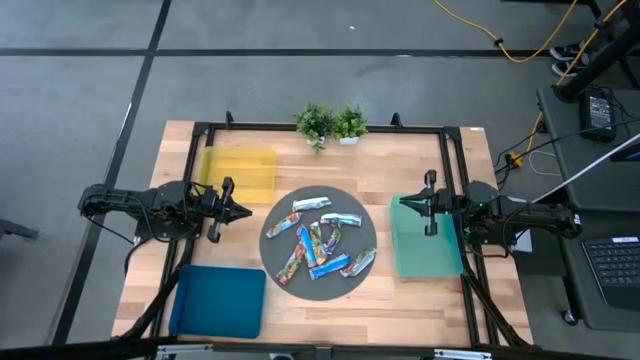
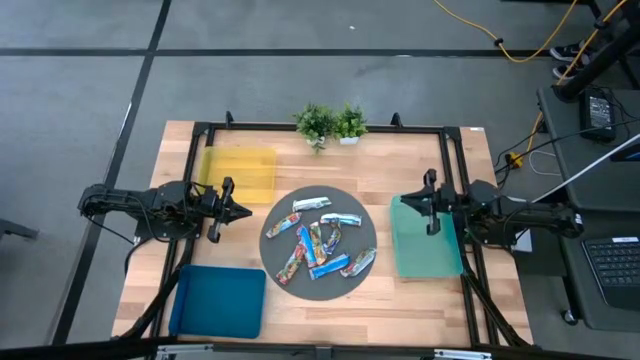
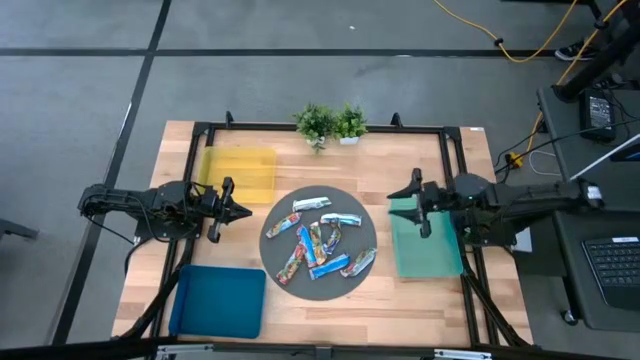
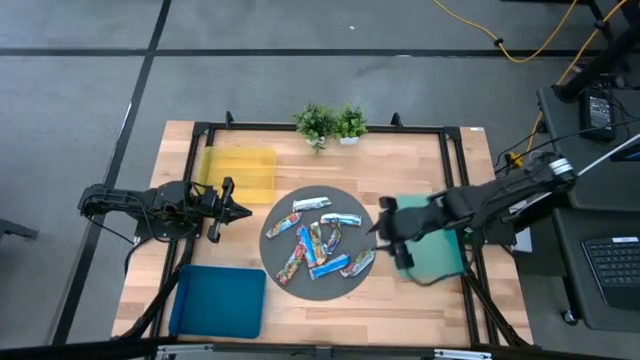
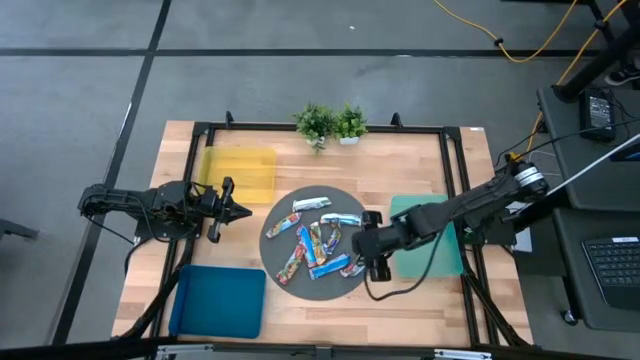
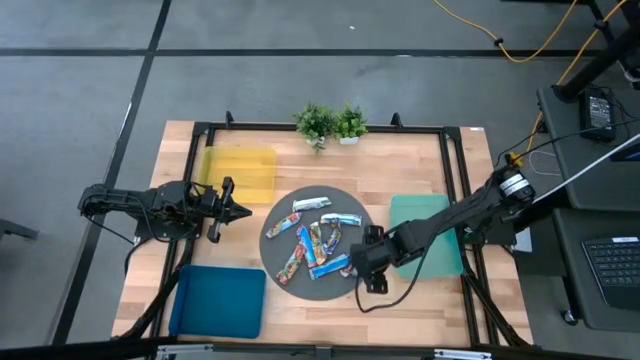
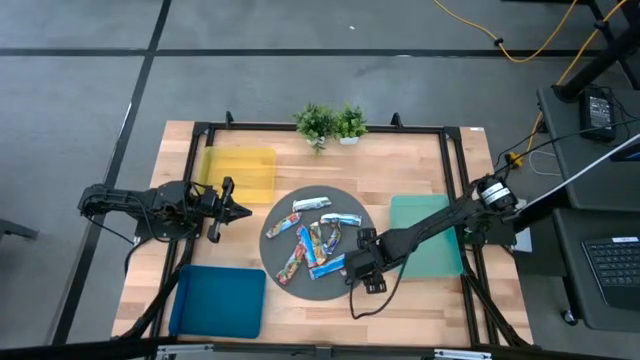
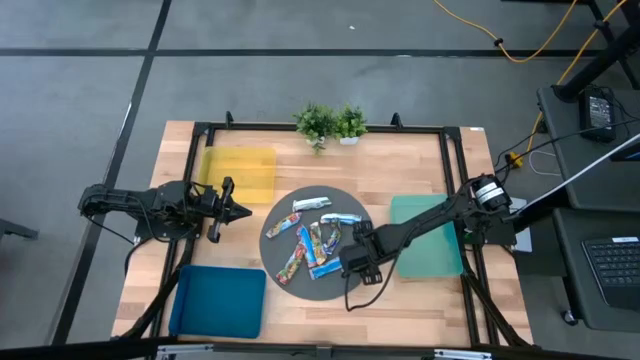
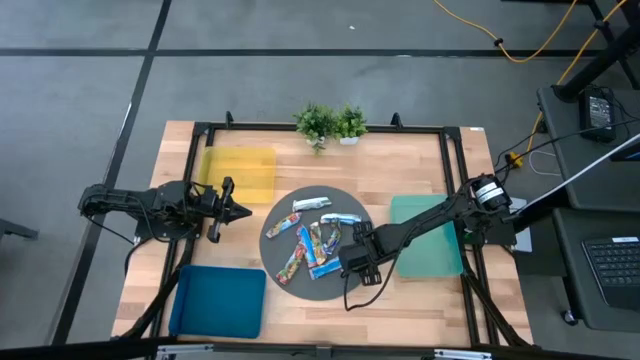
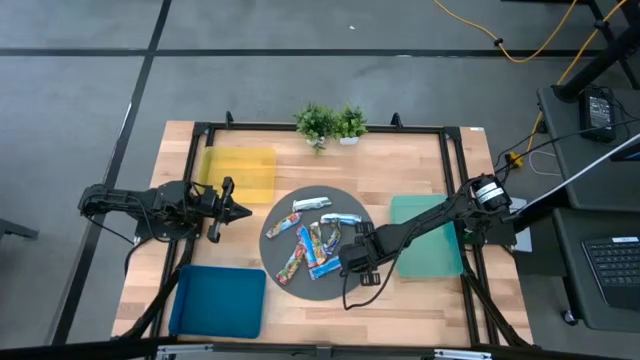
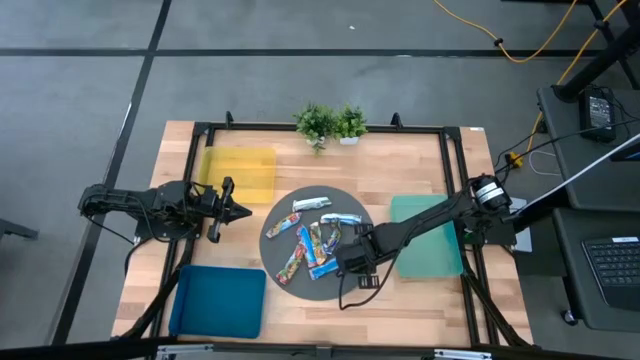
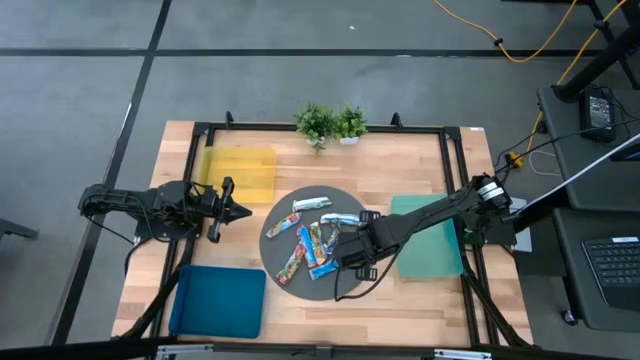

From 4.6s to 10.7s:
Task: Pick and place Granola Bars by type
Put the red granola bar into the green bin

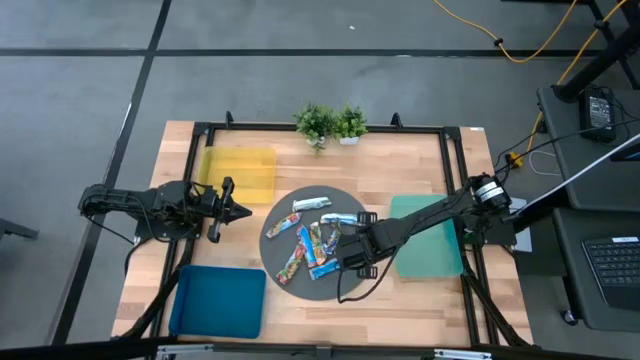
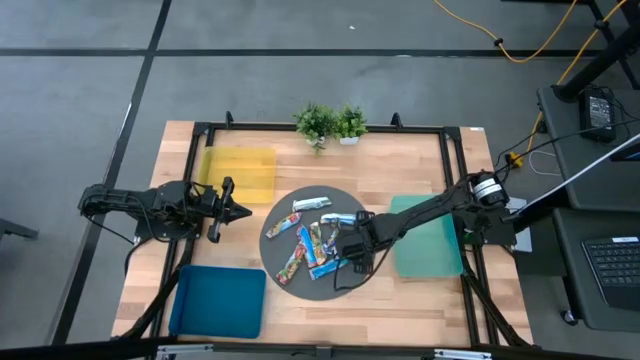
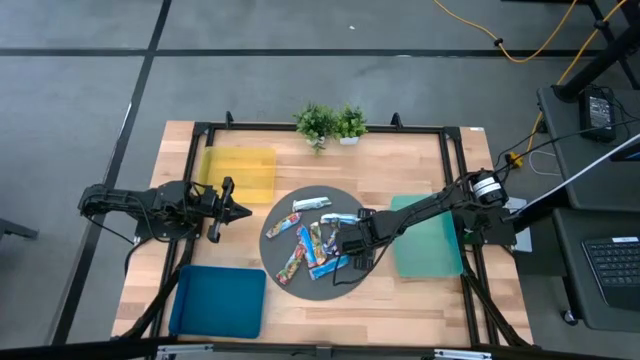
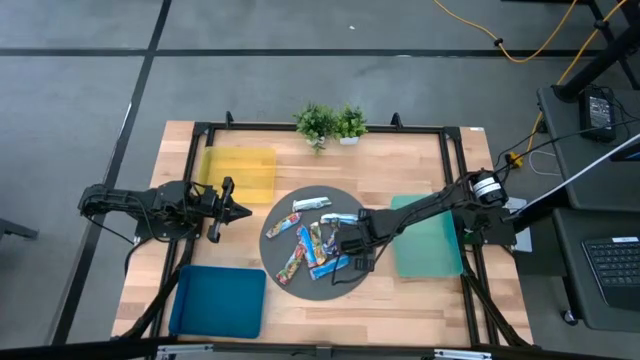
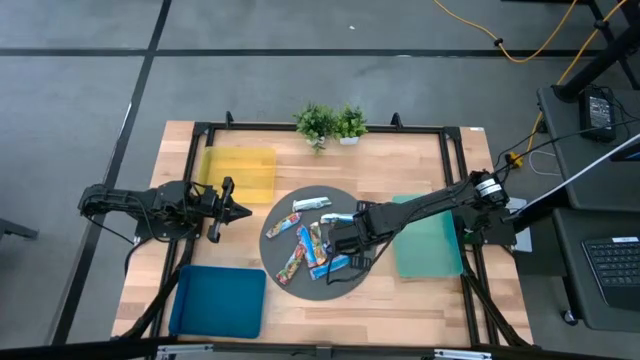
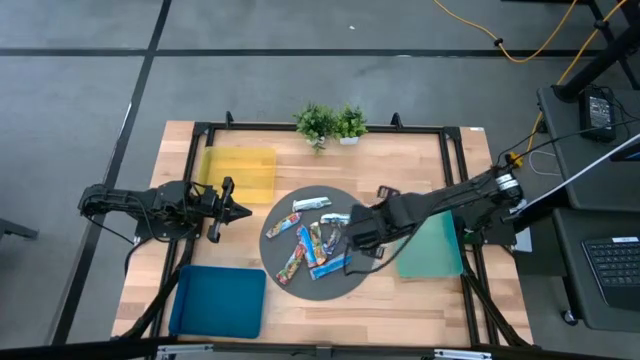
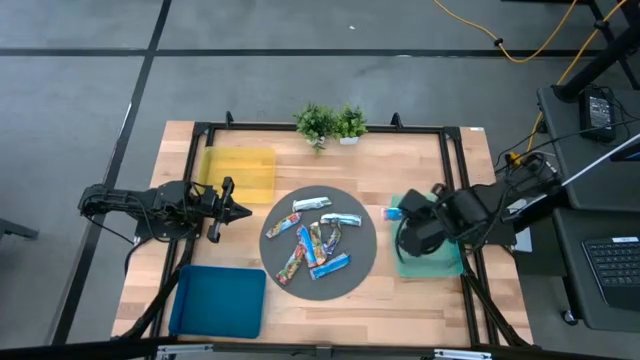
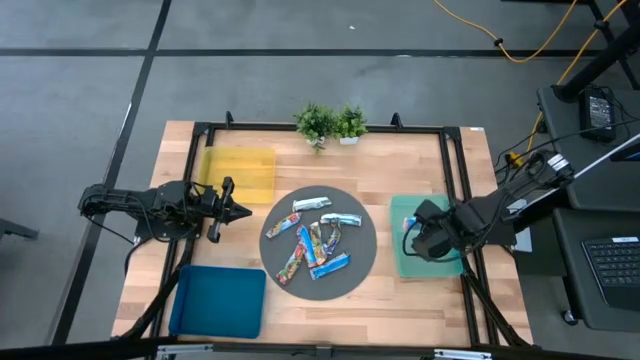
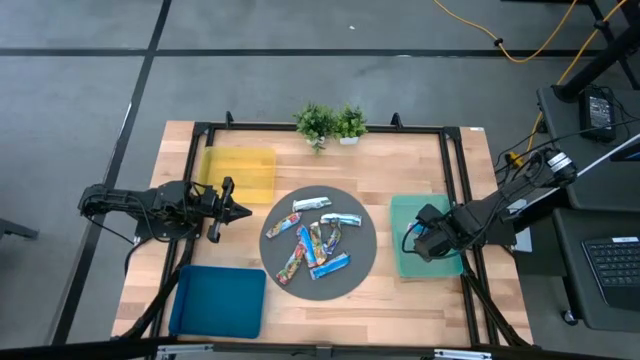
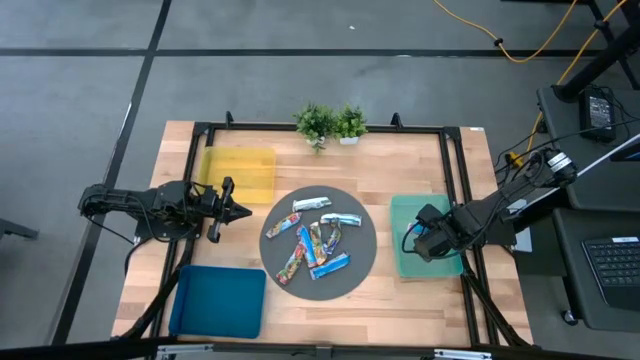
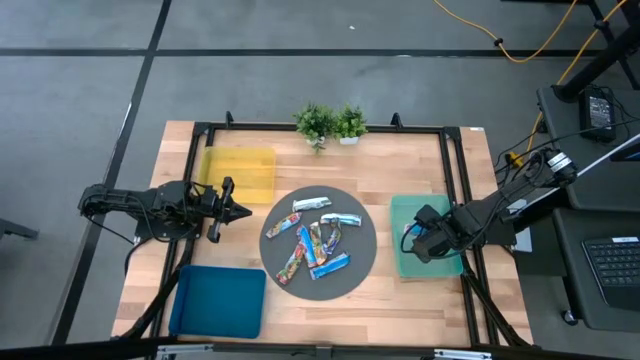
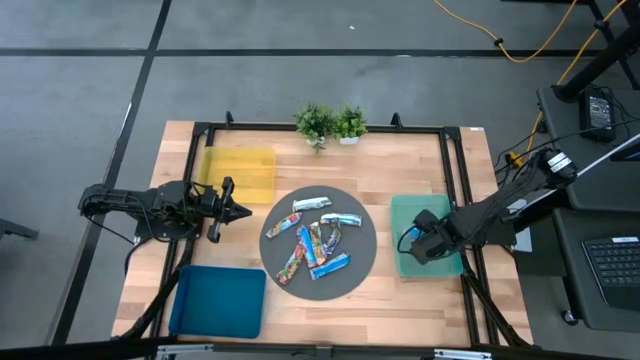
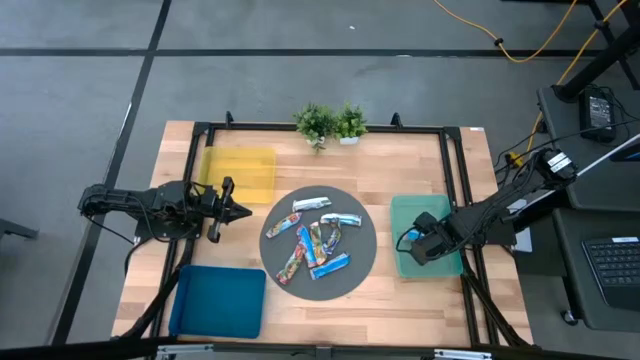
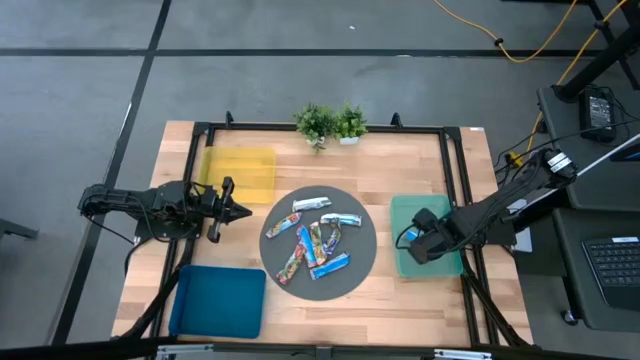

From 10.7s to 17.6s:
Put the red granola bar into the green bin

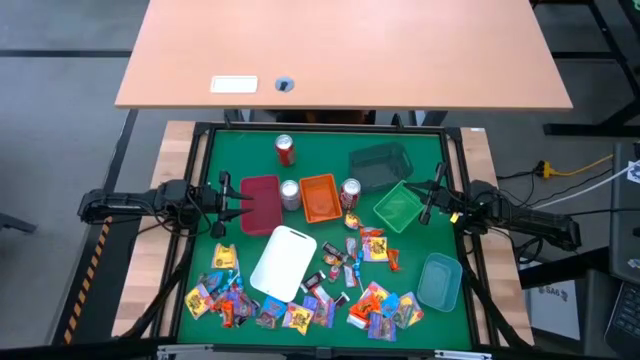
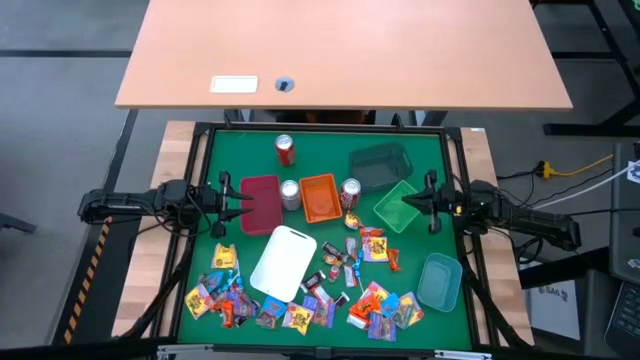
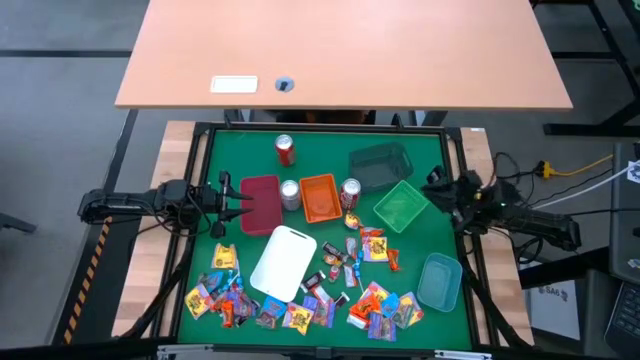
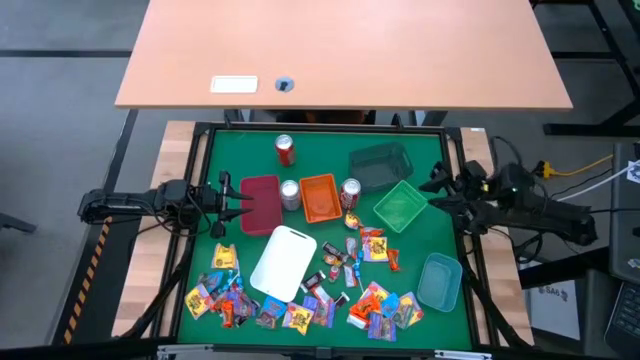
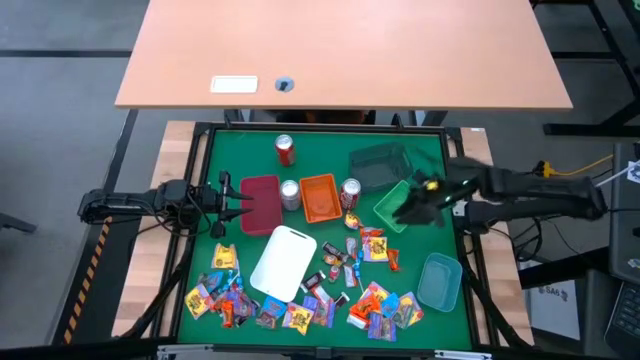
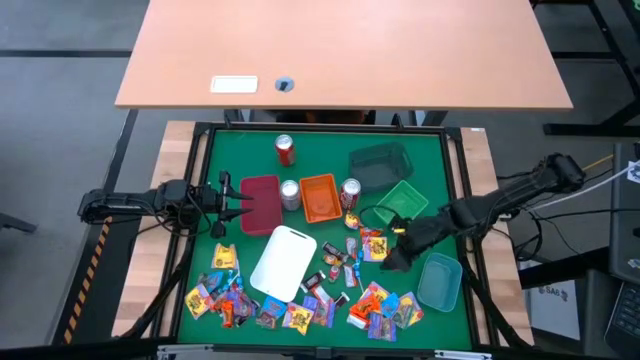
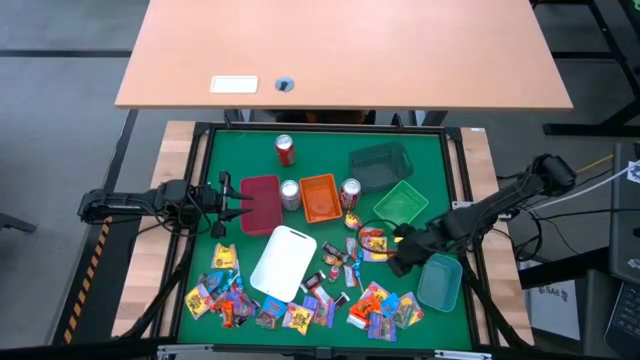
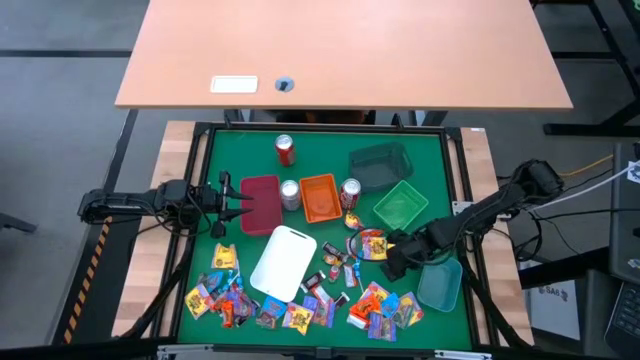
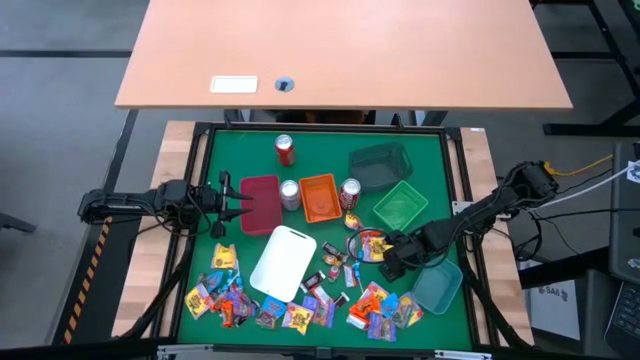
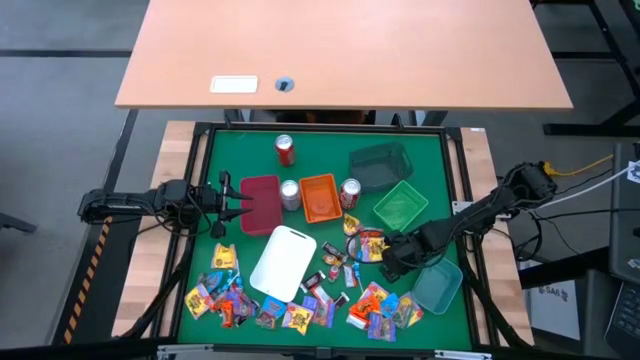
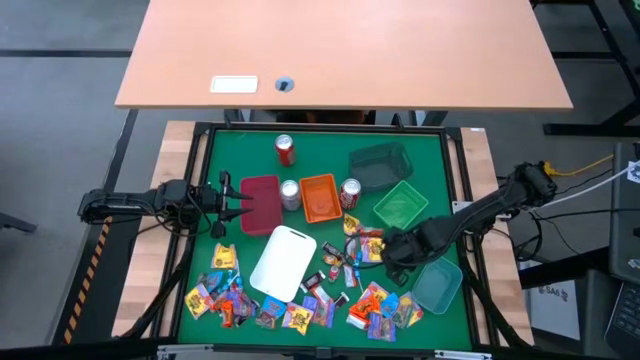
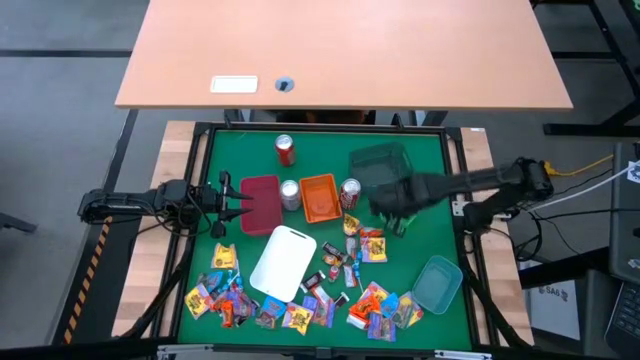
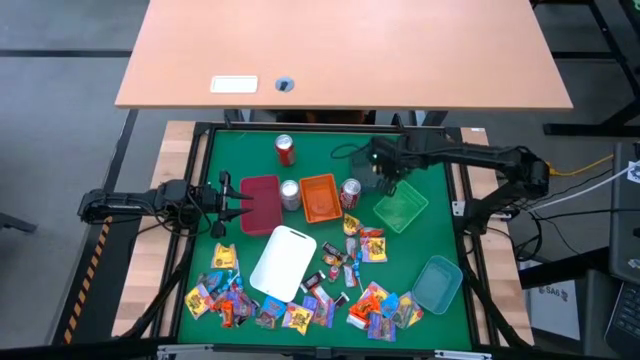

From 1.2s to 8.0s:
Task: Sort candy
Put the orange candy into the black bin

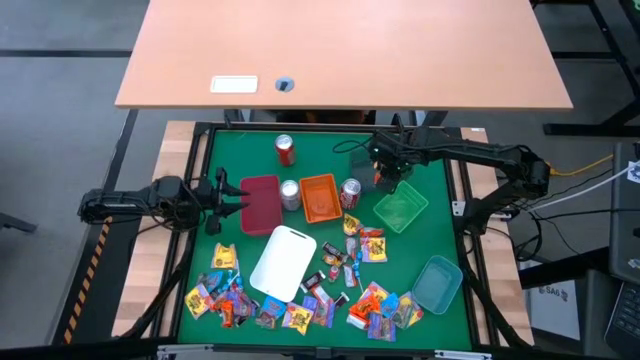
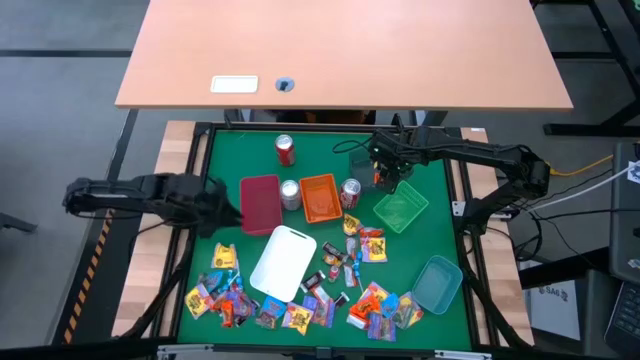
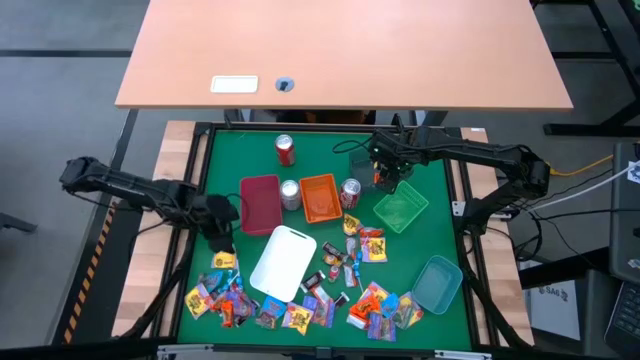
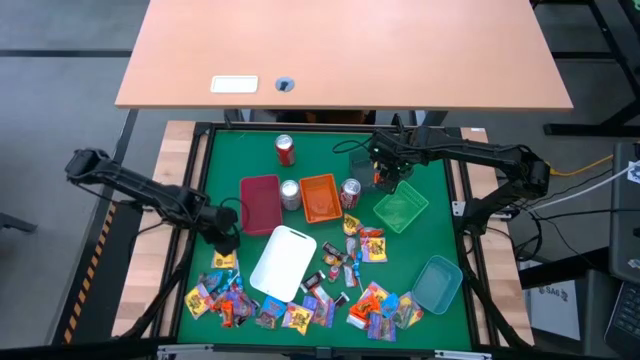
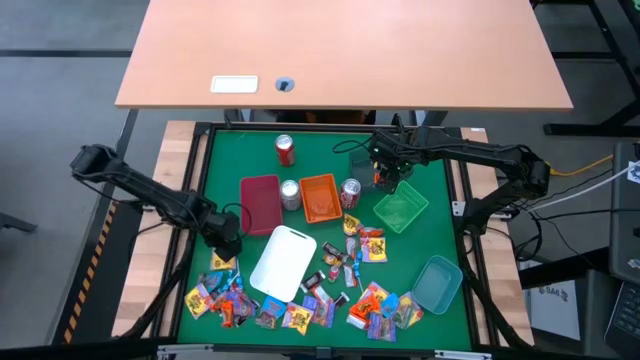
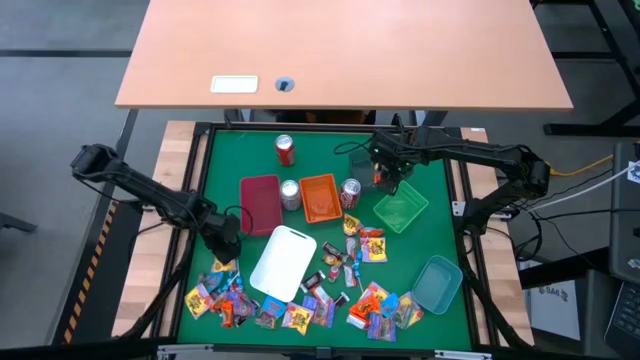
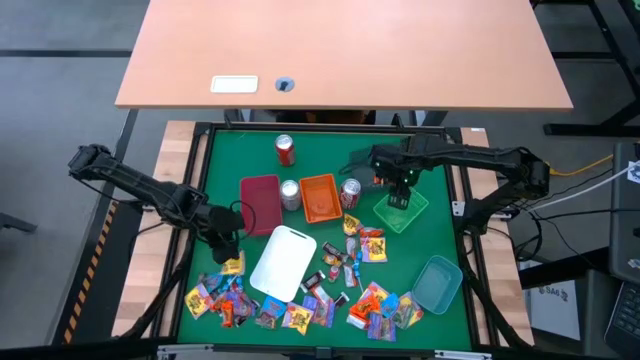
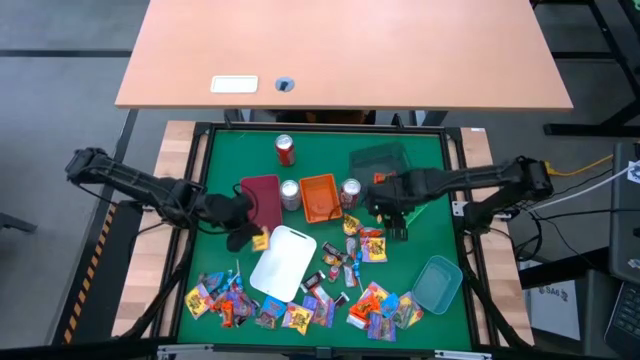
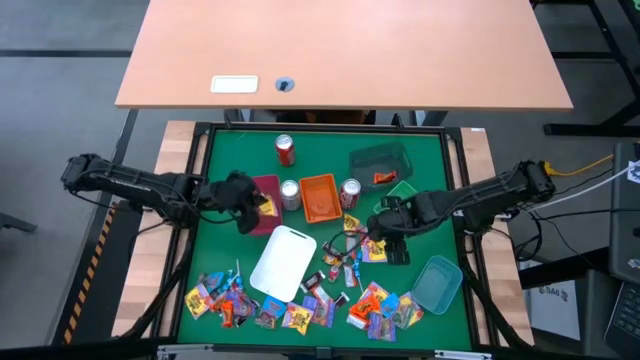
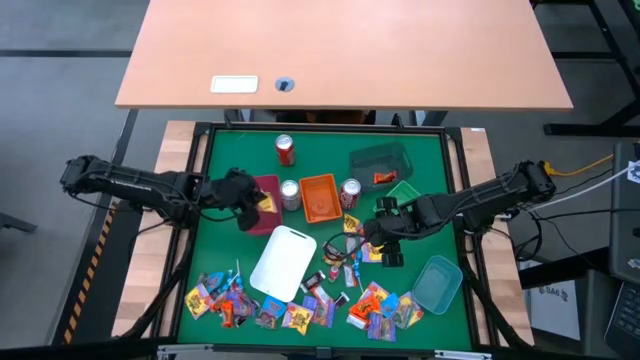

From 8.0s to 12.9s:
Put the yellow candy into the red bin
